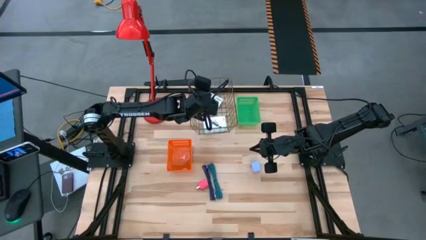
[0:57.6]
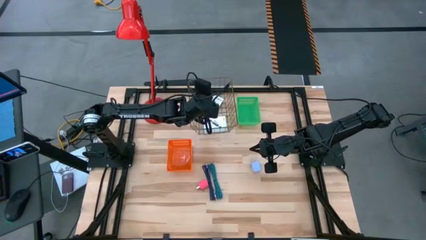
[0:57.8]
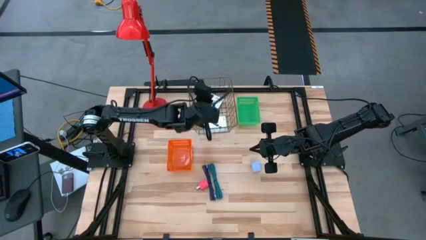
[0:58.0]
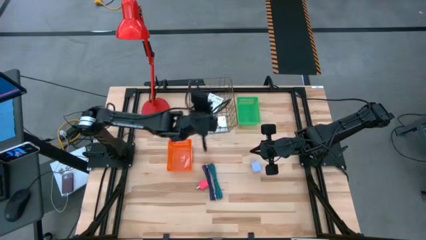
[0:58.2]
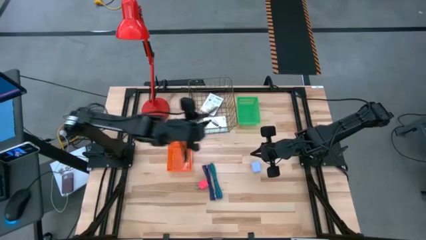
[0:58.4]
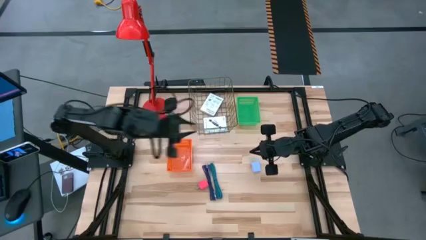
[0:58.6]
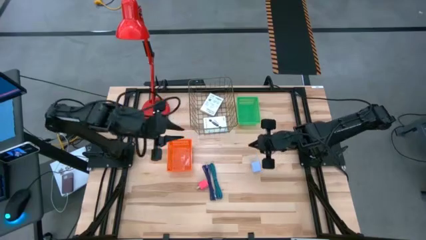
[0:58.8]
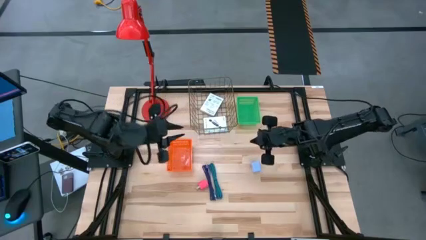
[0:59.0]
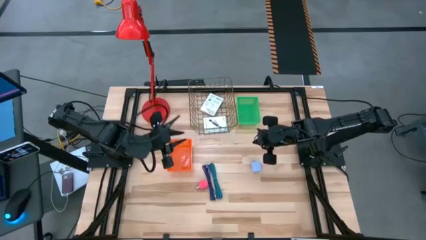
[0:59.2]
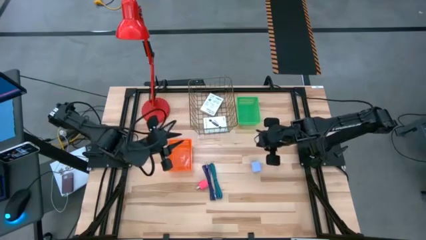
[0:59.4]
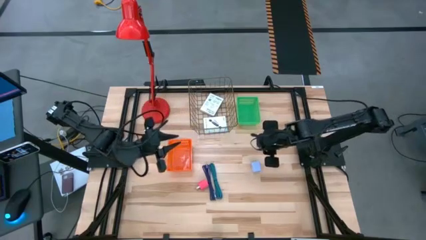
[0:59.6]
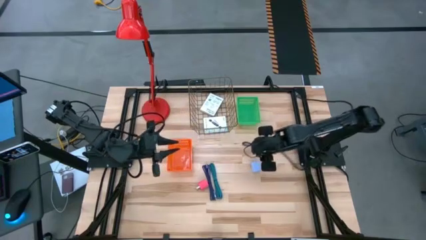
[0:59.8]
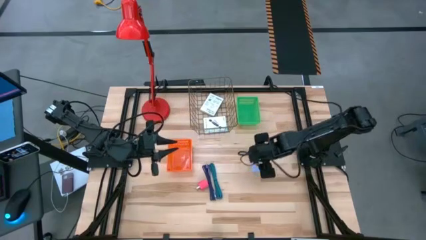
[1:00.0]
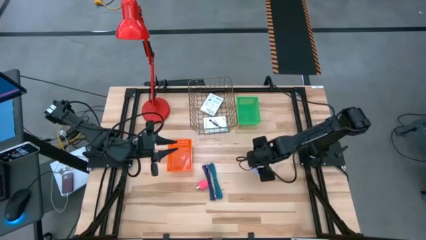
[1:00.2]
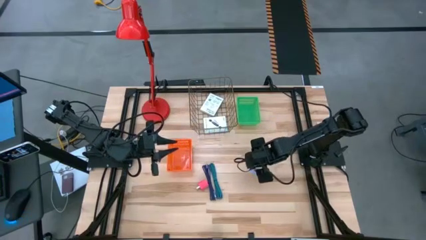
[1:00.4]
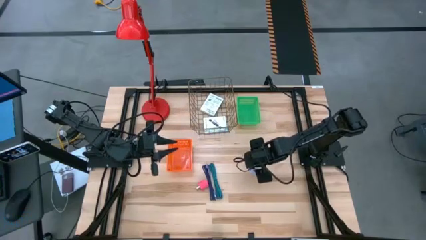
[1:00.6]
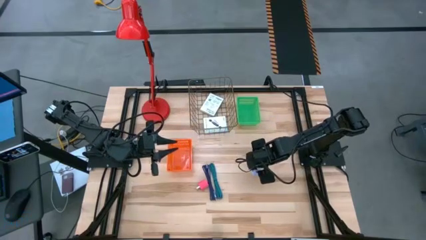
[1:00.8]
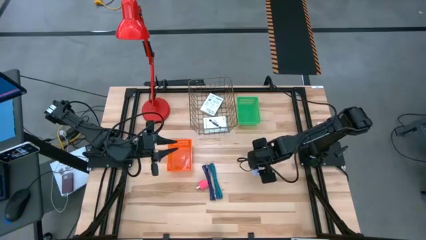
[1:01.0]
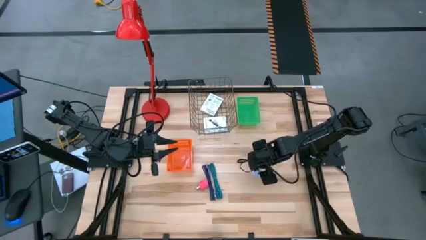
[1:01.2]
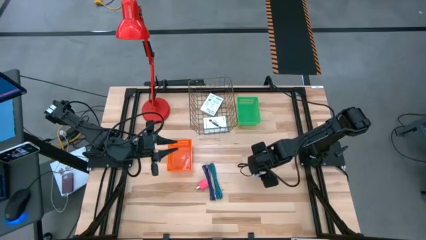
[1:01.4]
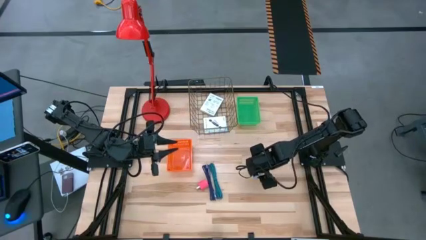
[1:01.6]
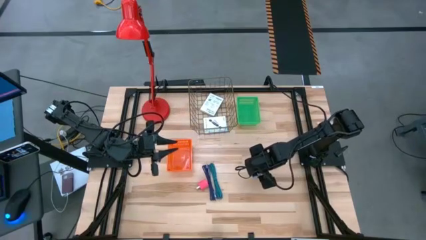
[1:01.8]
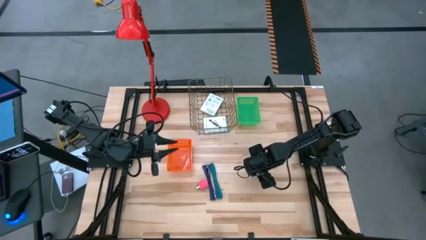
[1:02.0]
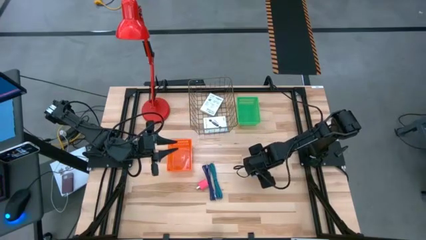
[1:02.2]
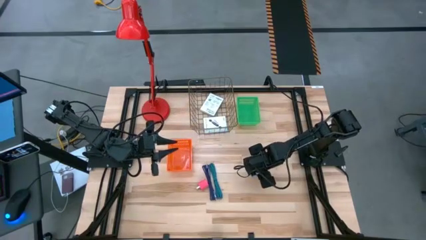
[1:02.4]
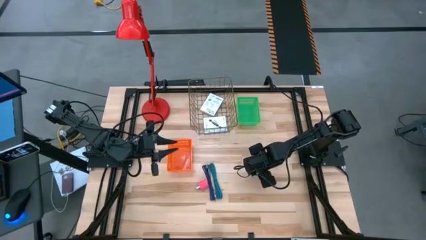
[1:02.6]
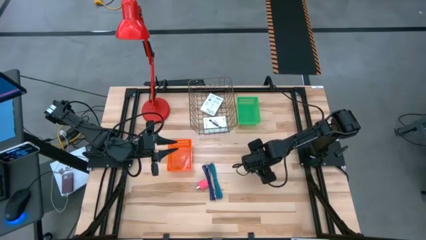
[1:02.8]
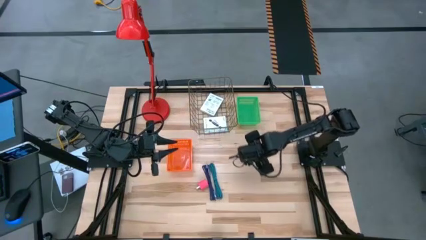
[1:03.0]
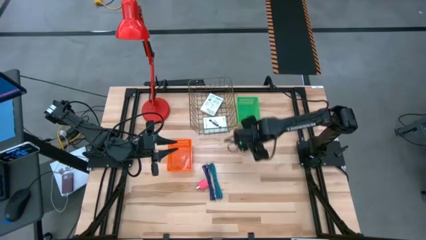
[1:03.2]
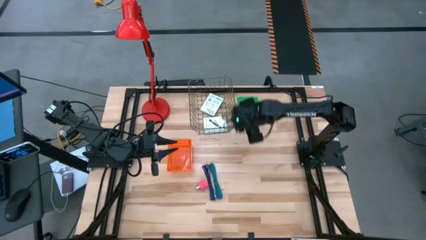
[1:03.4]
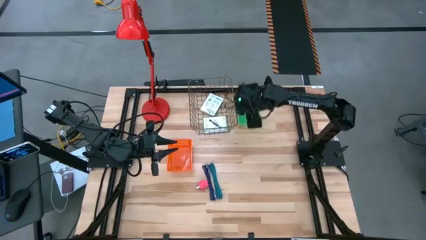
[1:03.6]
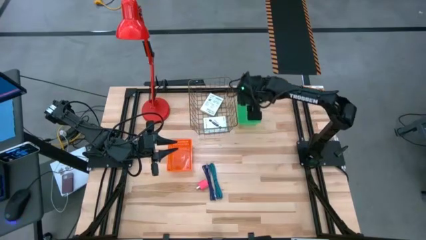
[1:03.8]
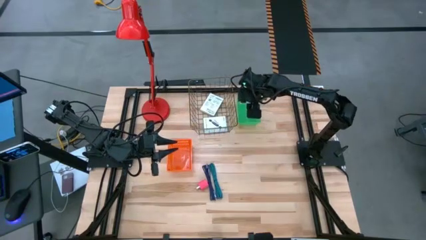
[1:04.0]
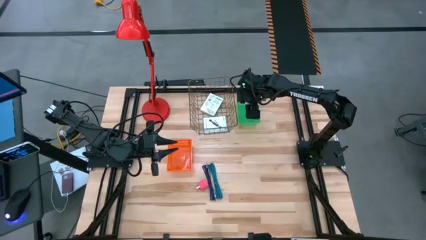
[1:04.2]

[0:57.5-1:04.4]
Task: Pick and place items into bin
Put the light blue charger adapter into the green bin

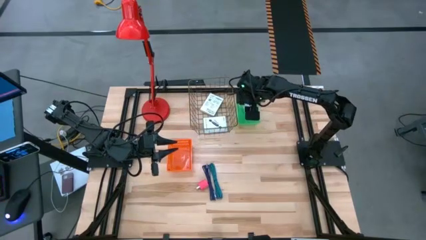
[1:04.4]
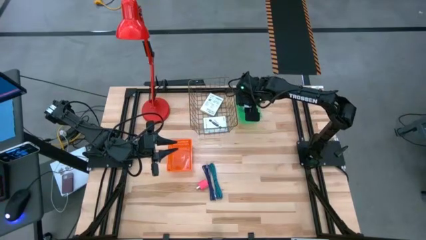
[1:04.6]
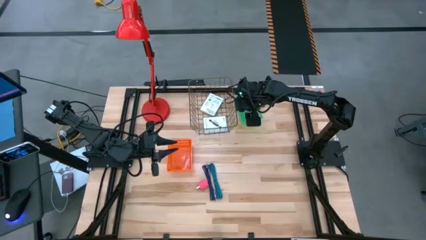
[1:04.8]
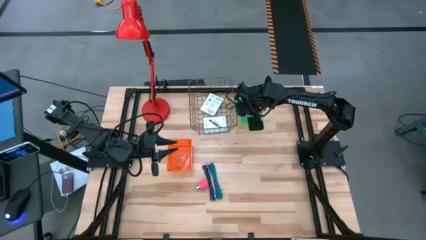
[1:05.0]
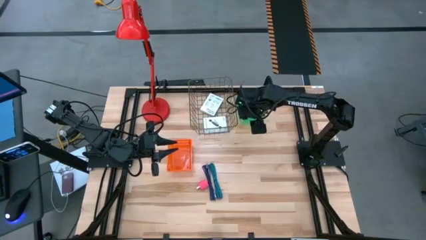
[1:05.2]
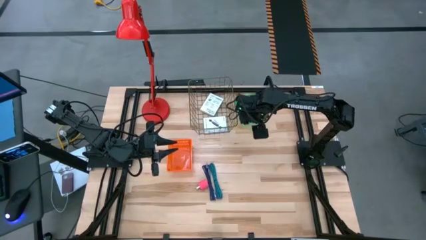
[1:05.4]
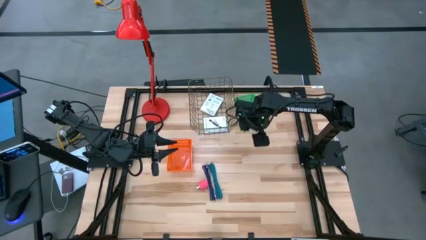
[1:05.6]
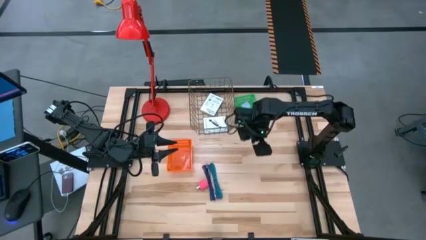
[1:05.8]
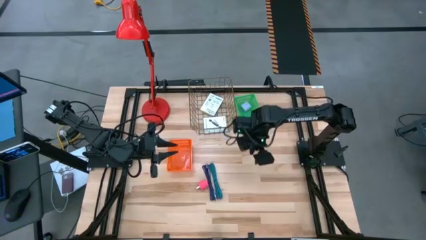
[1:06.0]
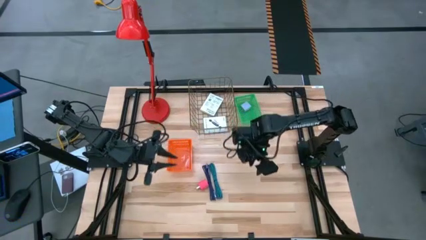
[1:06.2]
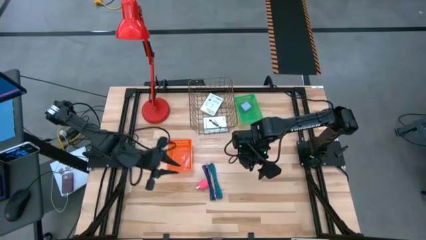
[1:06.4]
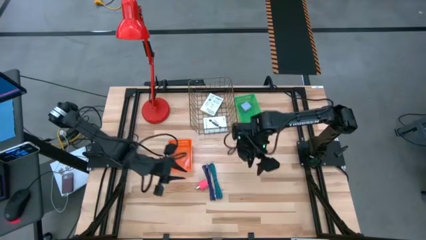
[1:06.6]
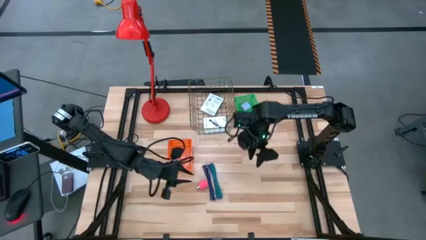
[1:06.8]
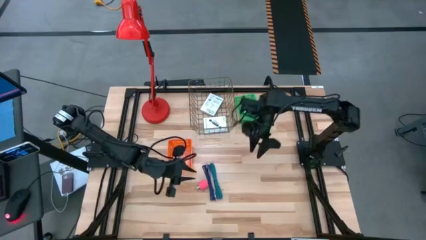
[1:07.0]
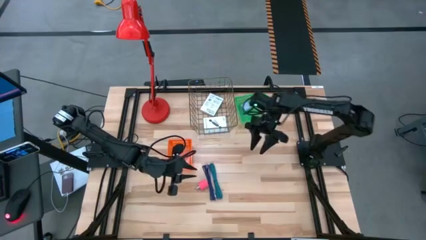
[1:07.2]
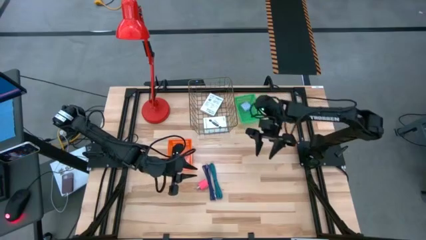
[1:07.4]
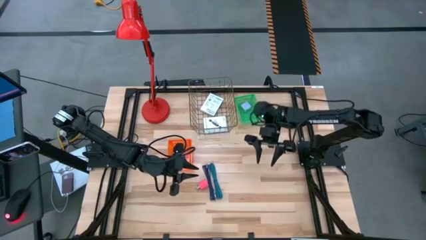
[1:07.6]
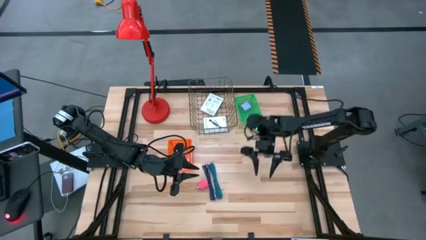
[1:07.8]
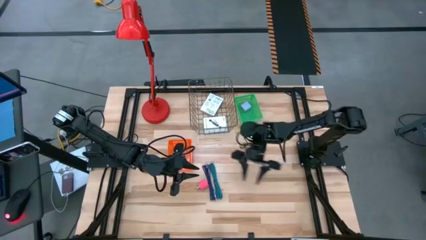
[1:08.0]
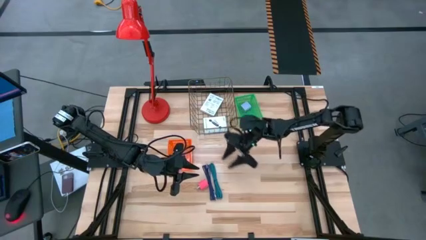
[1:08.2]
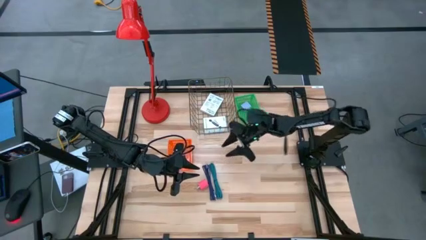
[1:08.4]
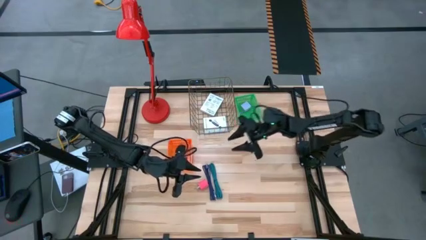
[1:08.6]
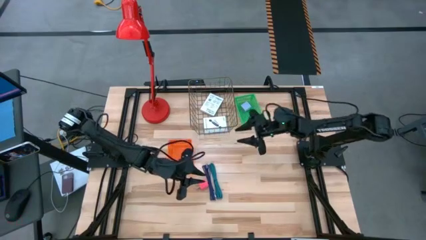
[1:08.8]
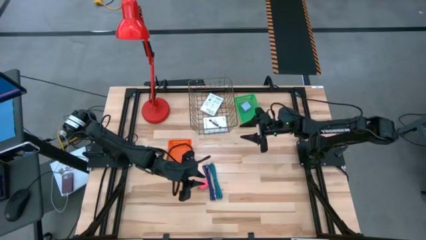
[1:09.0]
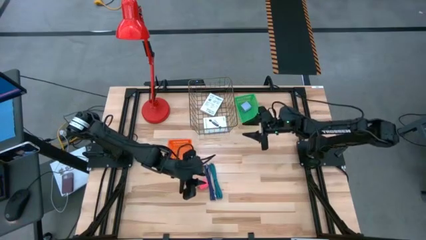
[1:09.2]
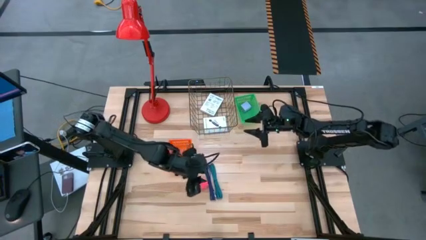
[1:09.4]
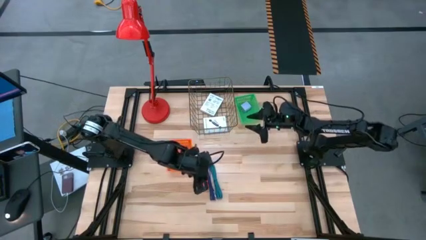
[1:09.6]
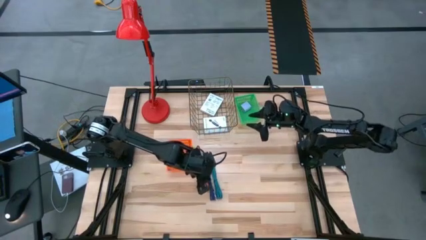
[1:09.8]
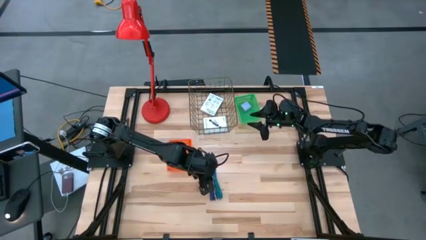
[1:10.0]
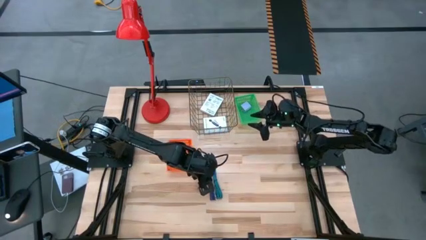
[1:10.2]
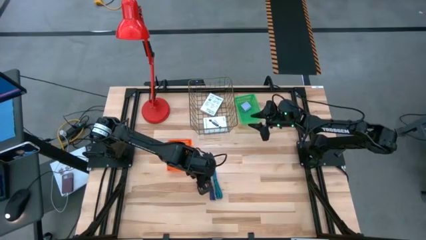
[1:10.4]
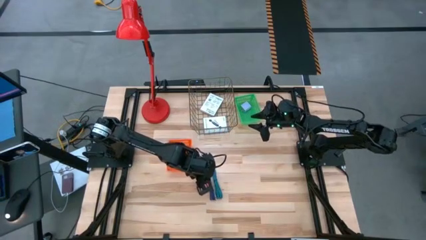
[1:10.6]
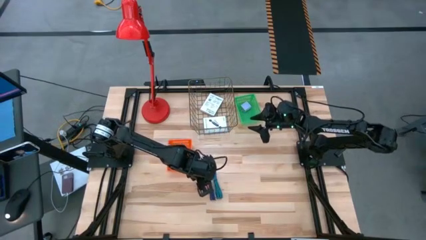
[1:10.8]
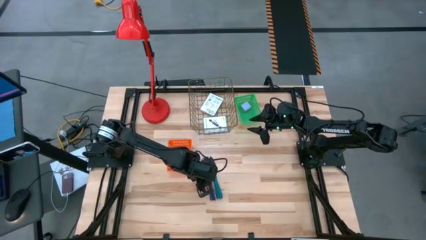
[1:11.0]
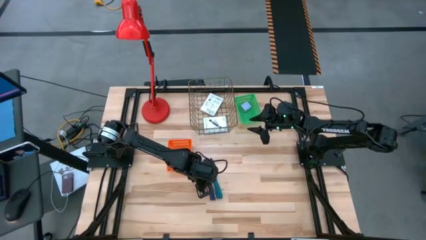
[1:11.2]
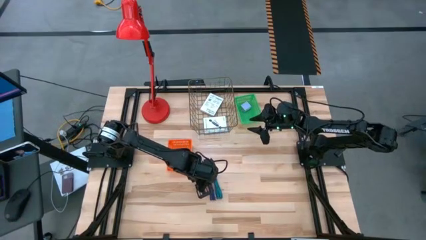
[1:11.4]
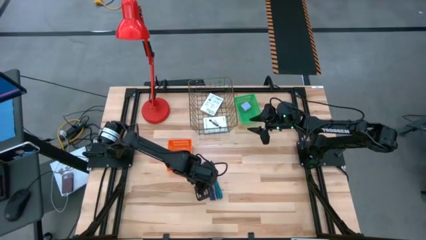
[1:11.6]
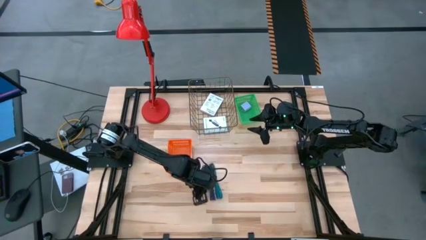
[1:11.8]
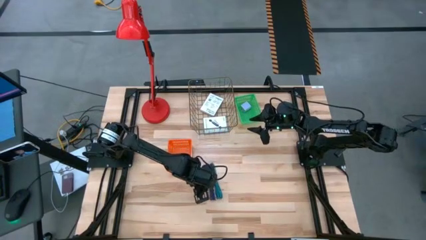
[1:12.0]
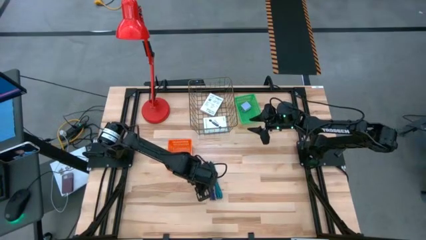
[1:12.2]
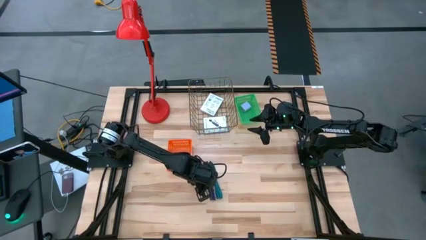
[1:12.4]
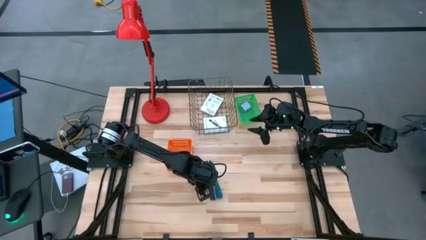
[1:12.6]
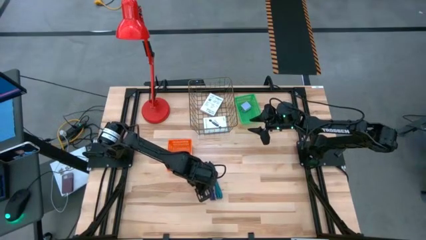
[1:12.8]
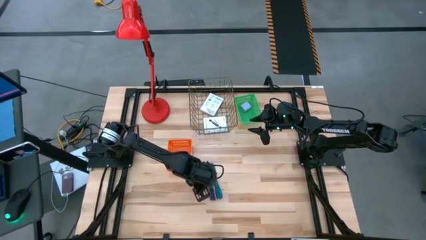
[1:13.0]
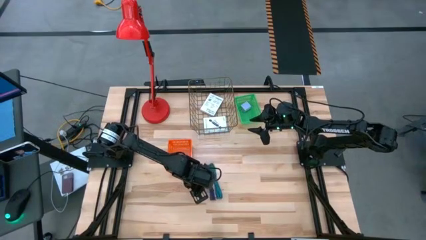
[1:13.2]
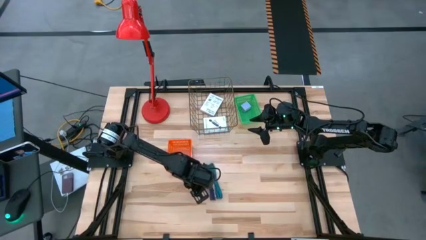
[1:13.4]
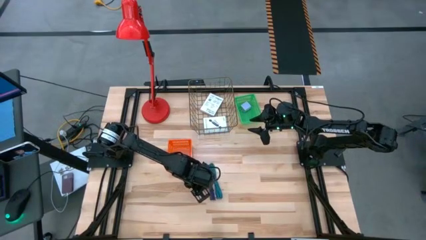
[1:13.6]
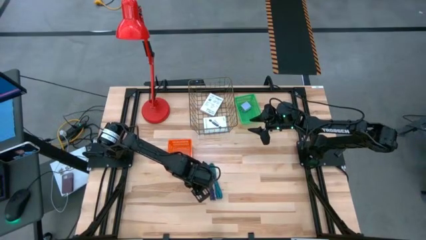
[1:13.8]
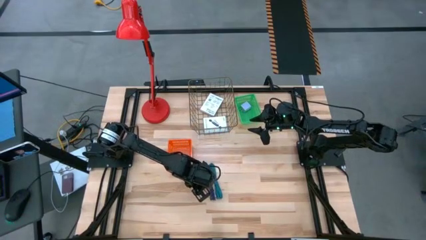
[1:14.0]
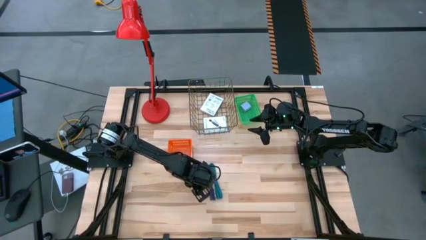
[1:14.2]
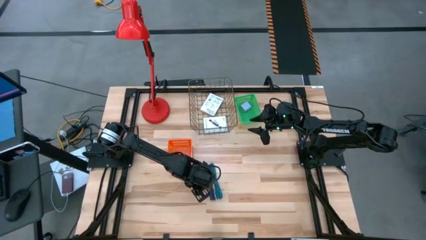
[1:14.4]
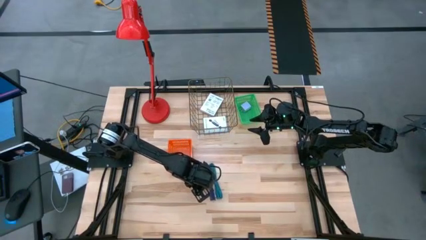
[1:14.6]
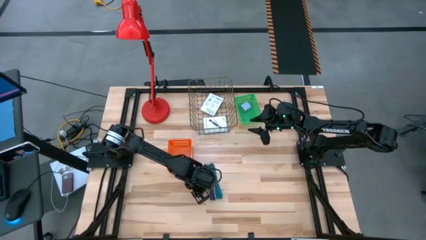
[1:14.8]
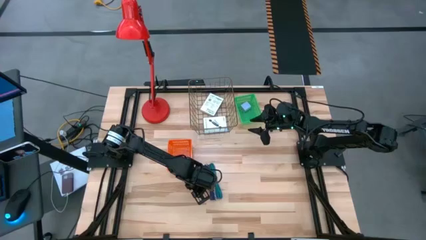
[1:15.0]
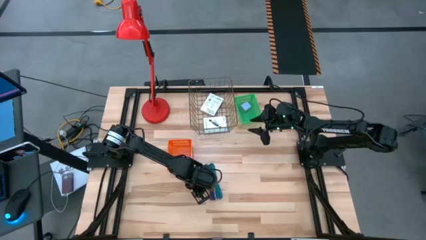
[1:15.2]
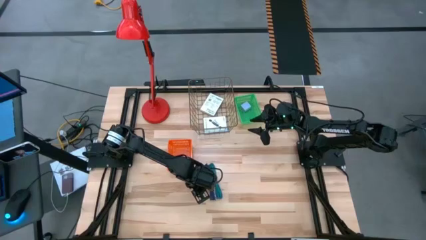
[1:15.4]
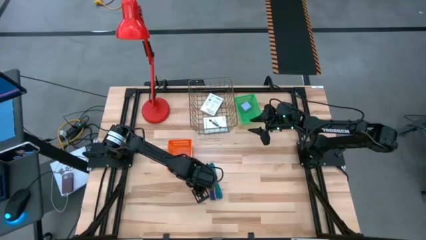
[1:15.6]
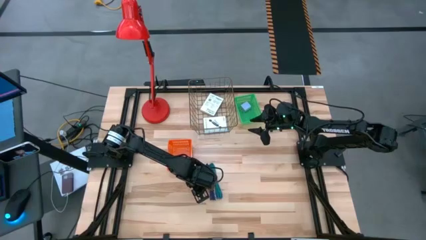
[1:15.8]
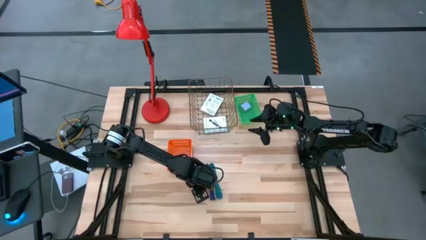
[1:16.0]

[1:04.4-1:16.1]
Put the pink charger adapter into the green bin
